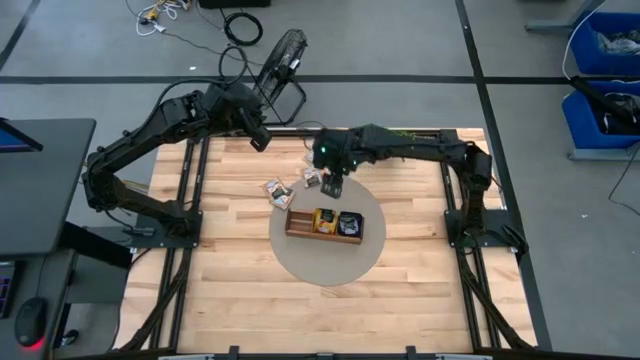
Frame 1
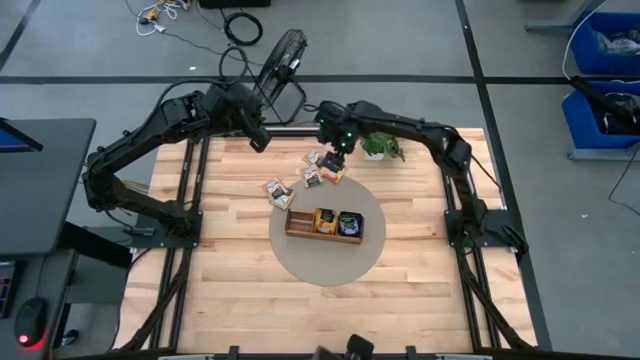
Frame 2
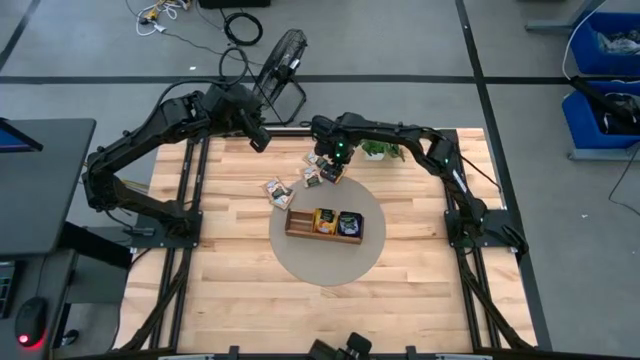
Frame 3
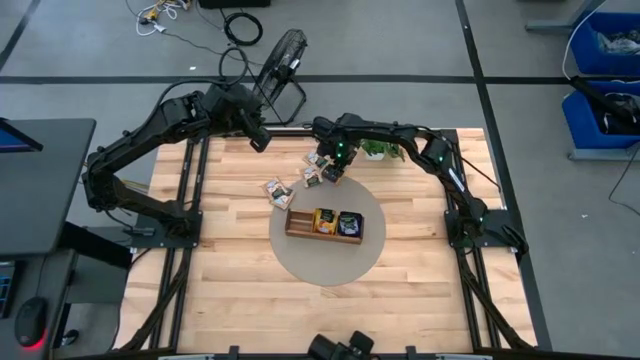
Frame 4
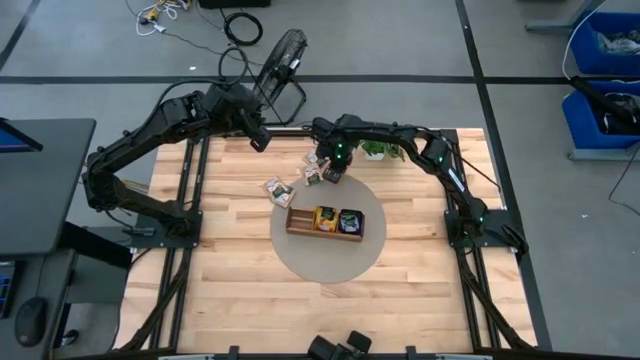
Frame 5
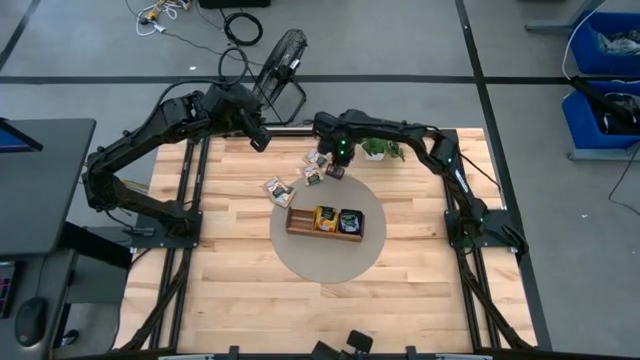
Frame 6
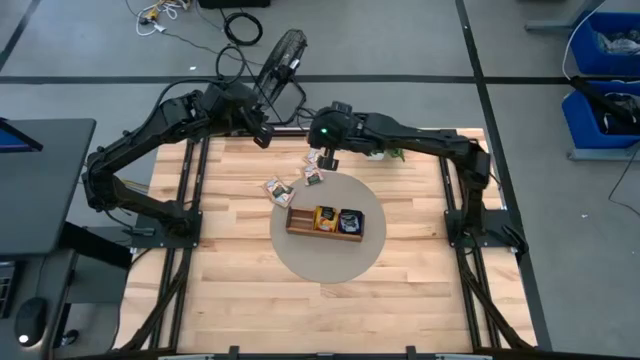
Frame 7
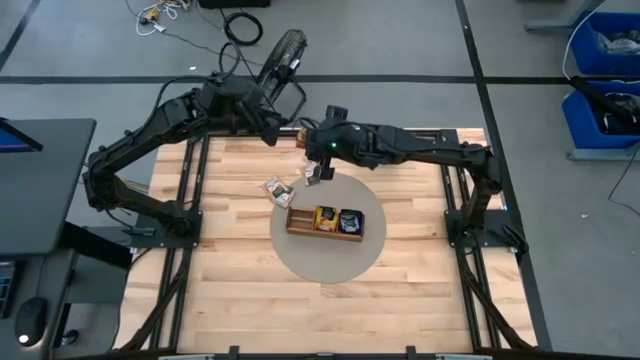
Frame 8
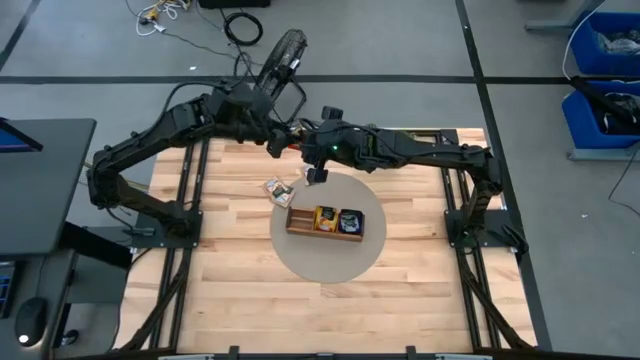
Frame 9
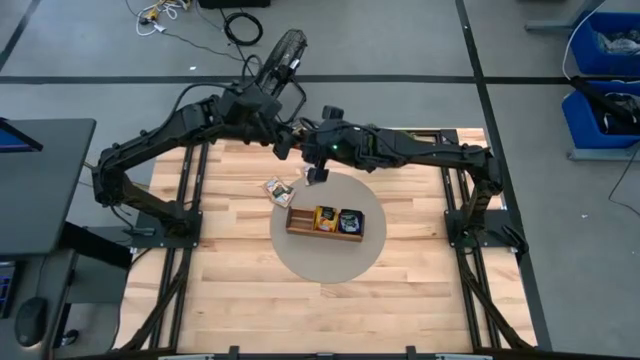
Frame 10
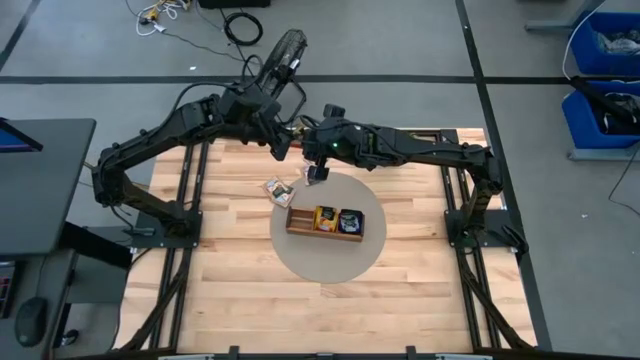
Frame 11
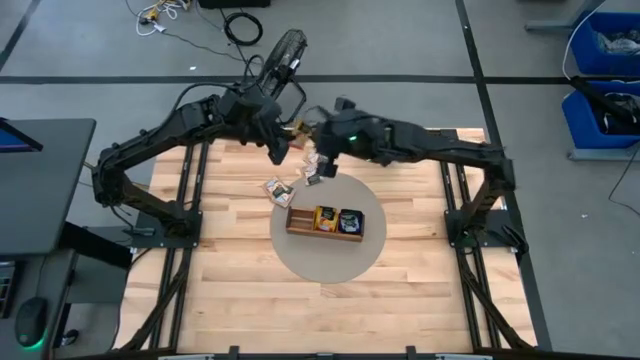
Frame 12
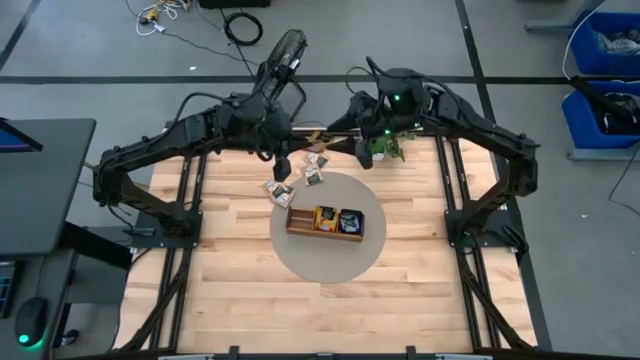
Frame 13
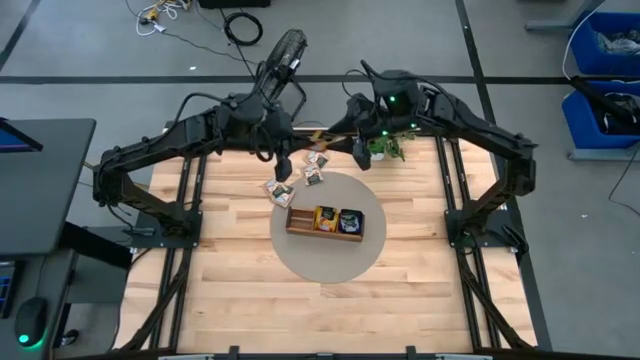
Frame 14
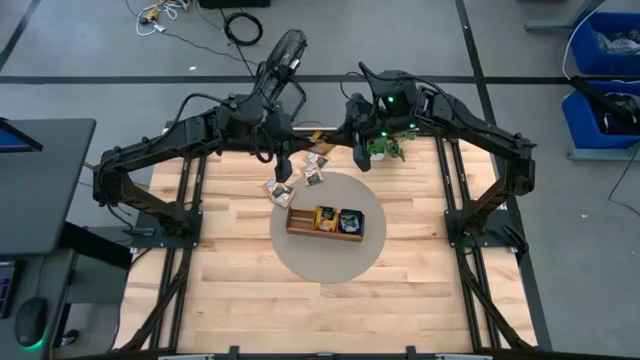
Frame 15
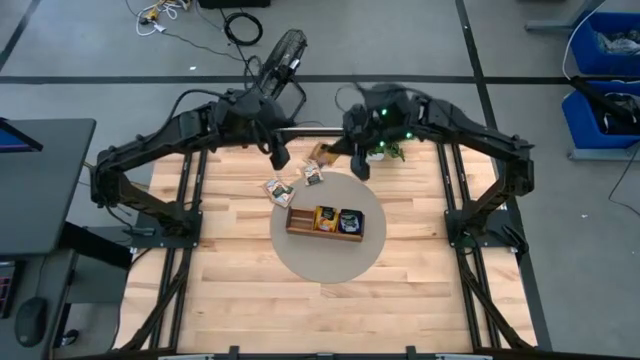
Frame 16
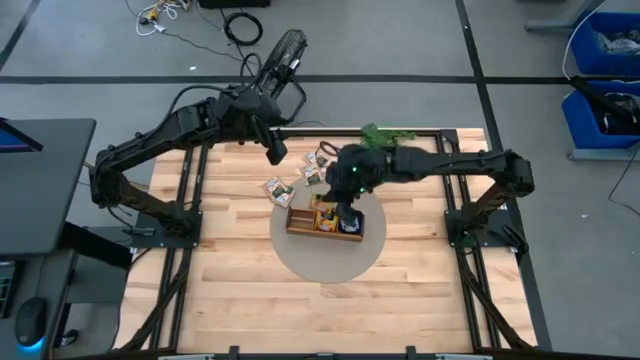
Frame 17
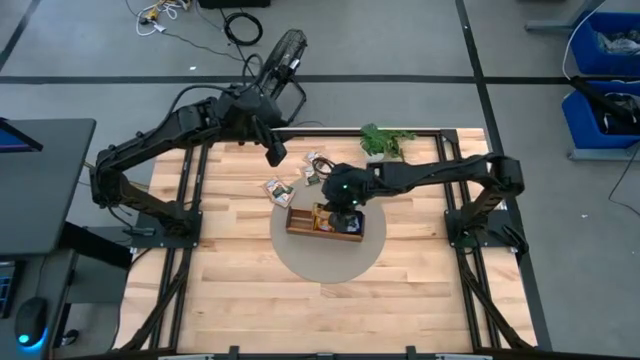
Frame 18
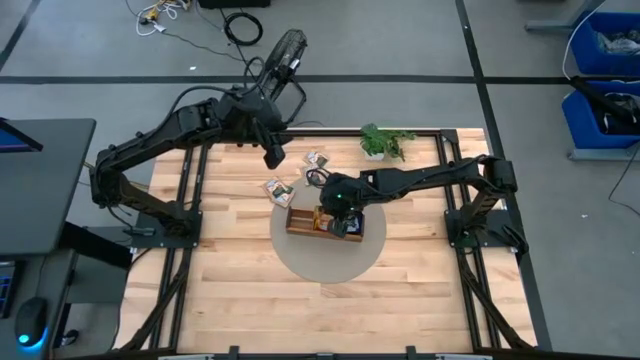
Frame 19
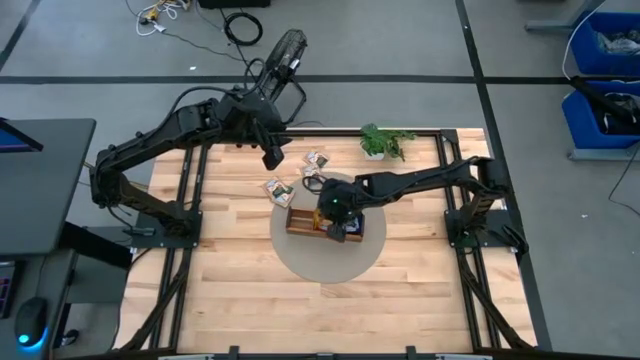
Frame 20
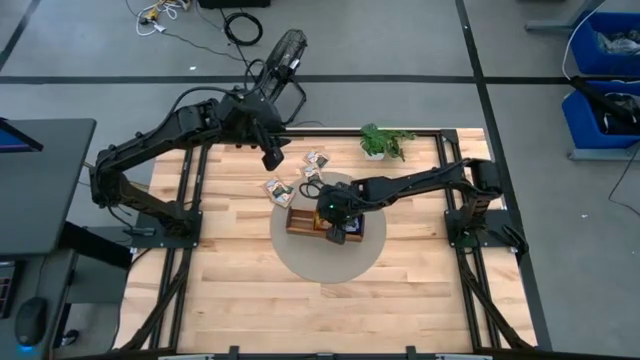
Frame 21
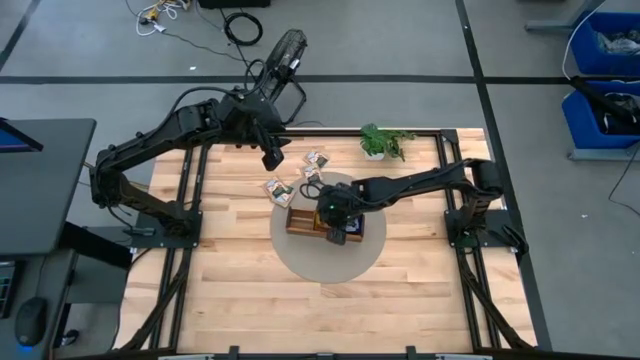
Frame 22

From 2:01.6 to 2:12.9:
Task: Pick & Place Tea
Put the yellow tea bag into the middle section of the wooden organizer

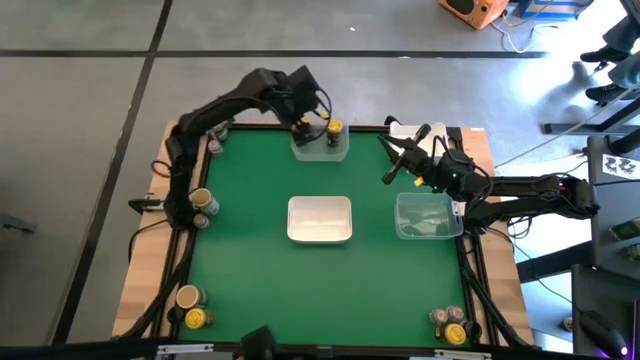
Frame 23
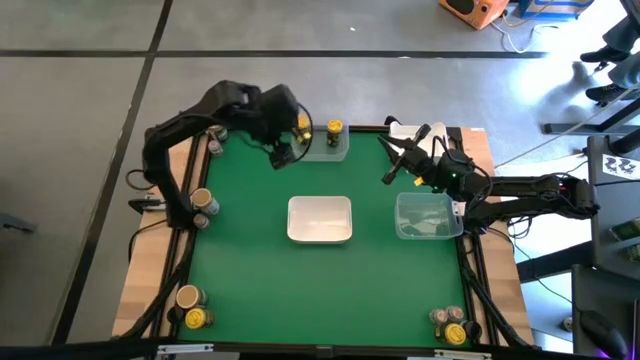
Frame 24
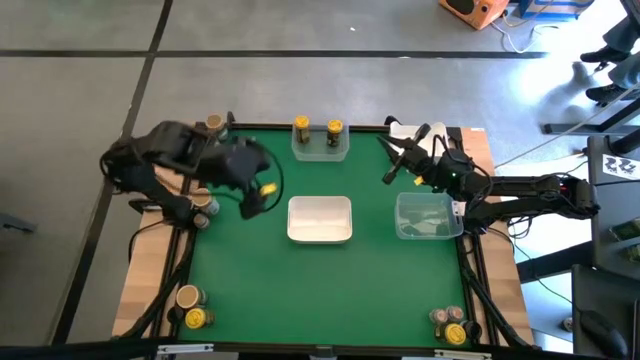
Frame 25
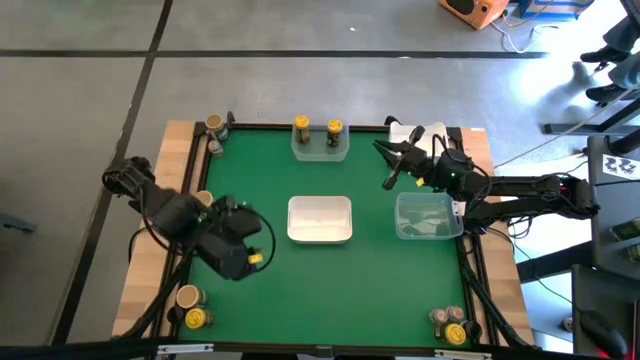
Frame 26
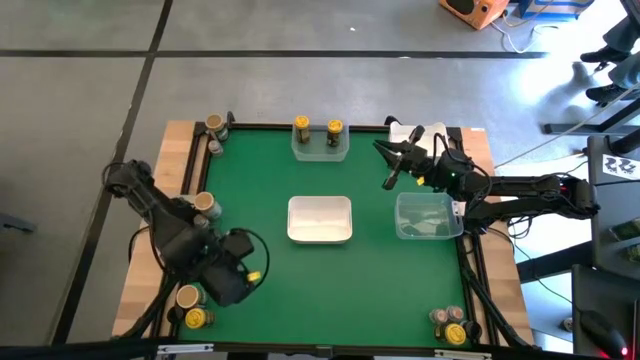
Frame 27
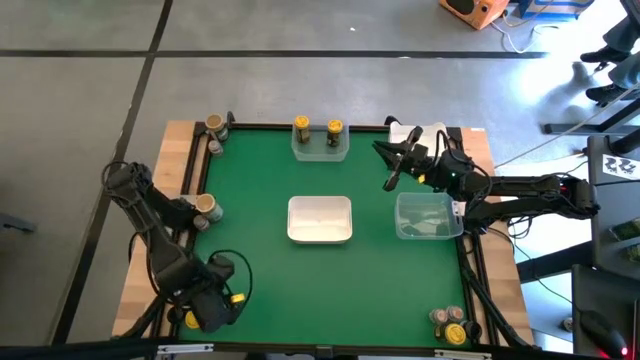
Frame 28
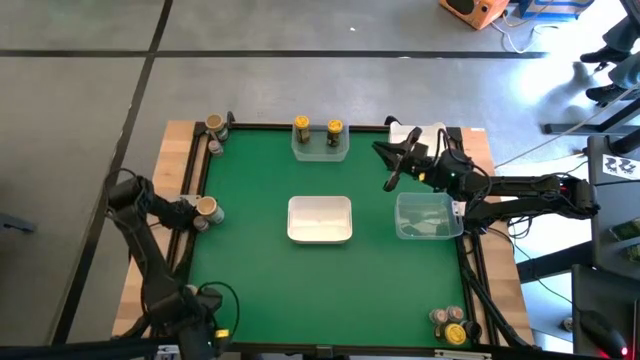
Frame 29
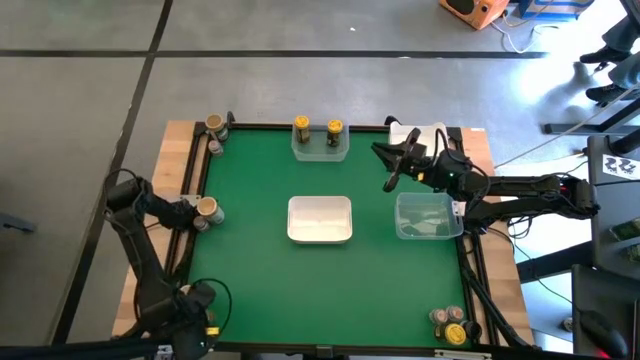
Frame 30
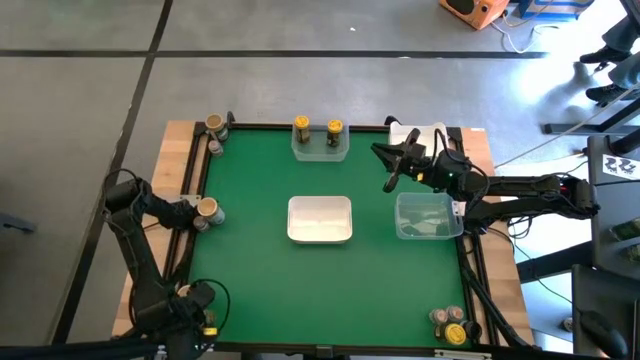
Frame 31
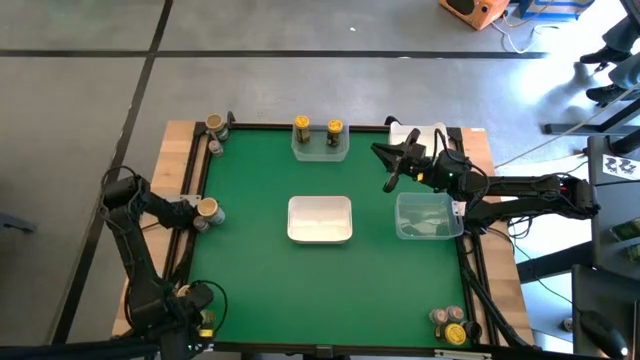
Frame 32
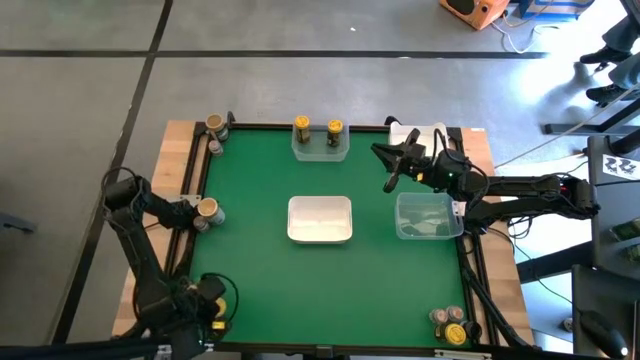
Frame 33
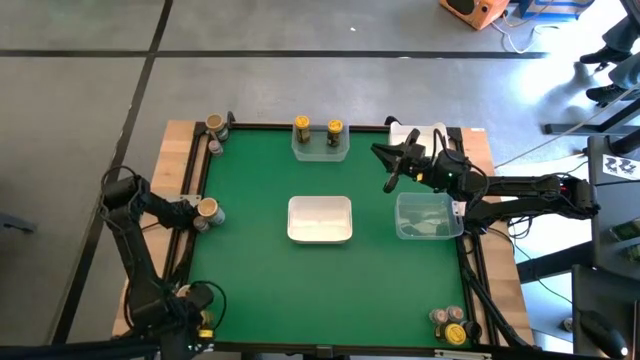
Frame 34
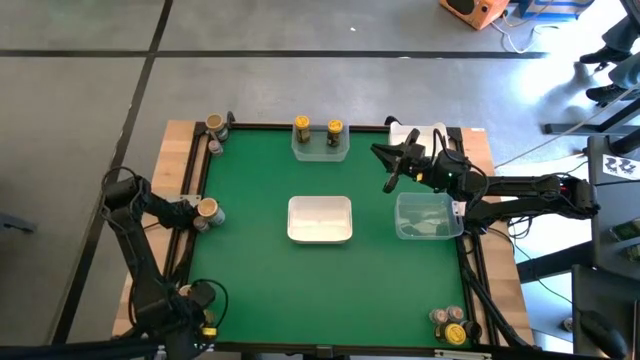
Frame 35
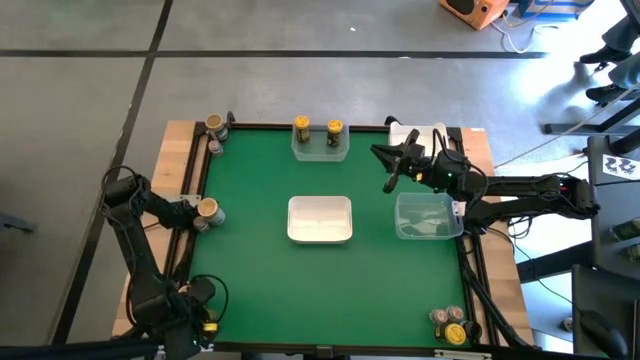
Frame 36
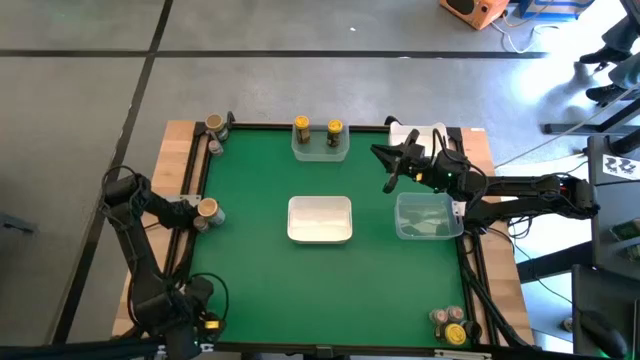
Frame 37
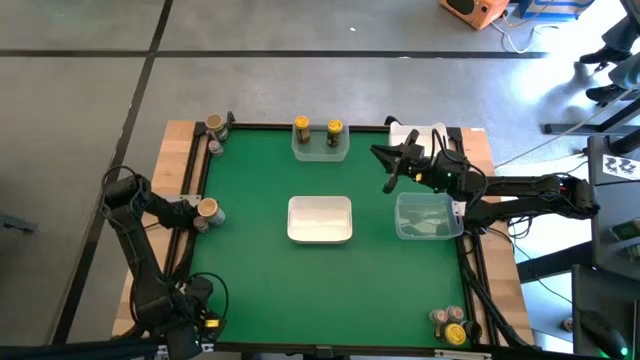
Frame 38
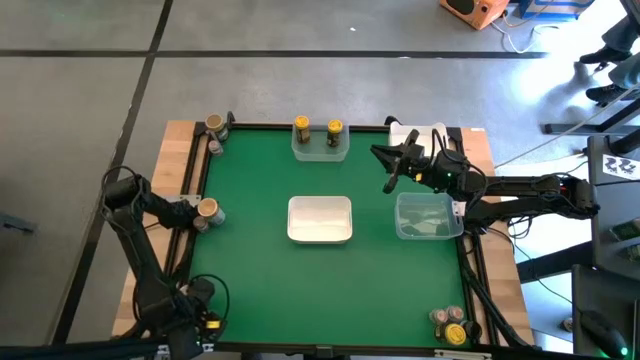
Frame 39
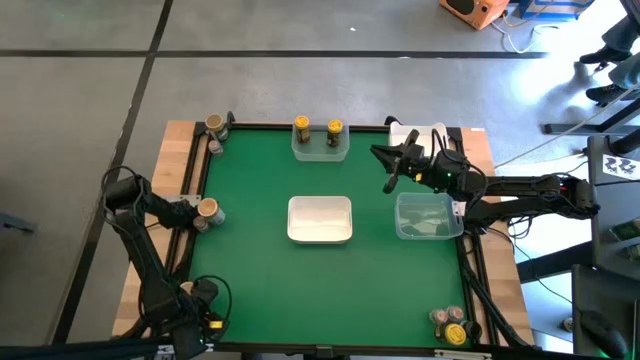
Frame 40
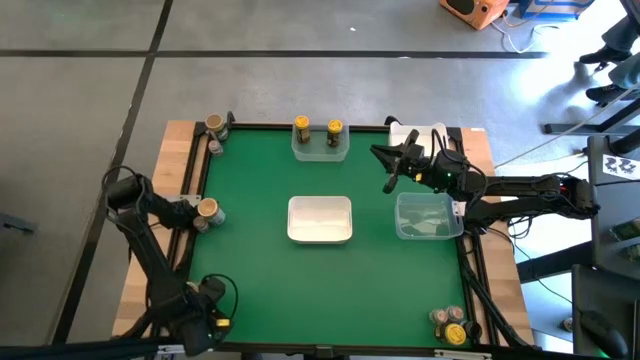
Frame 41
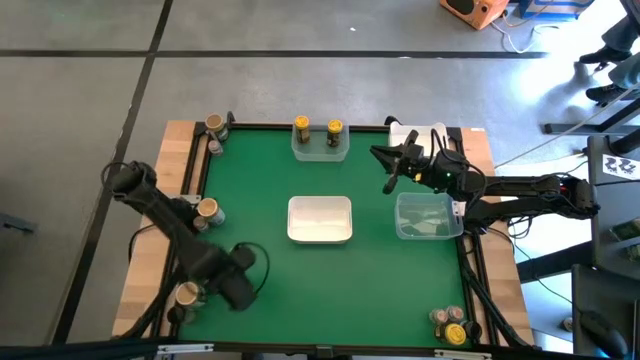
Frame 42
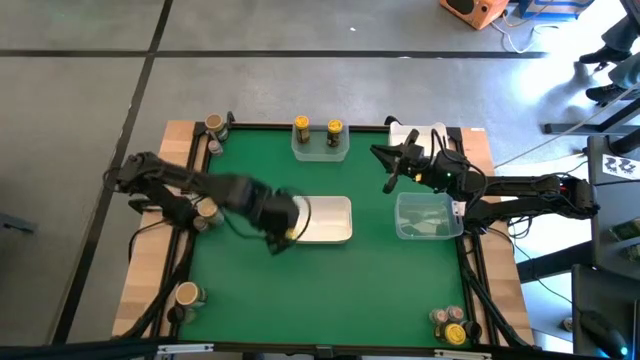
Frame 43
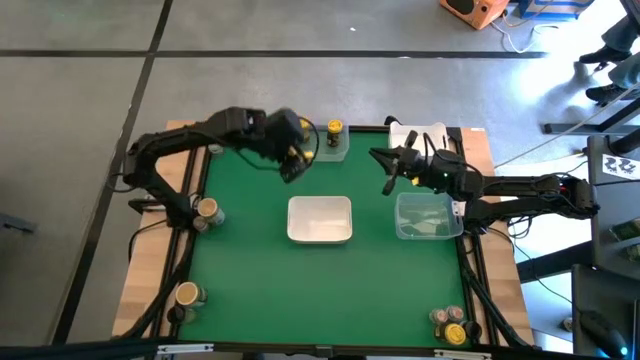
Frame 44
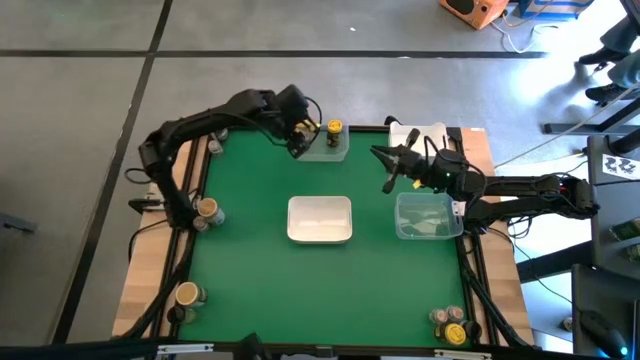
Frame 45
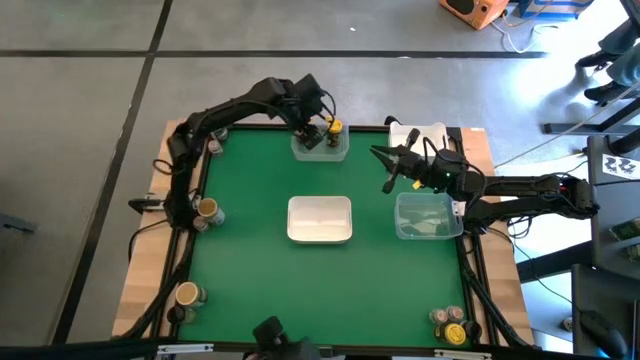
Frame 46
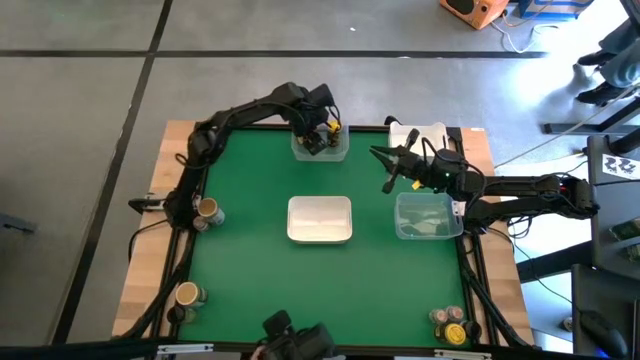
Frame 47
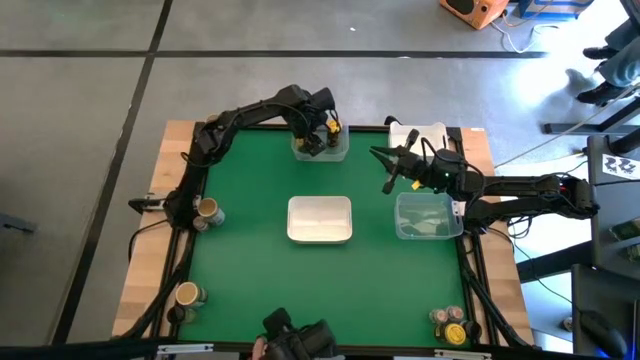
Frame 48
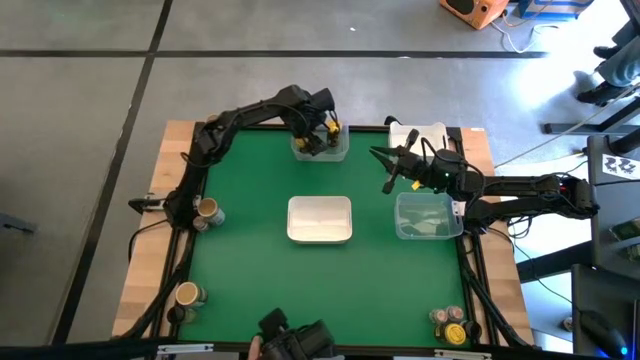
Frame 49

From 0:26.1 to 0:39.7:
Task: Sort spices by type
Put the left yellow seasoning bottle into the top transparent bin
